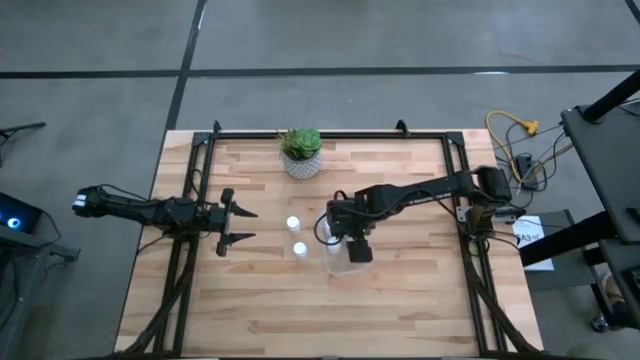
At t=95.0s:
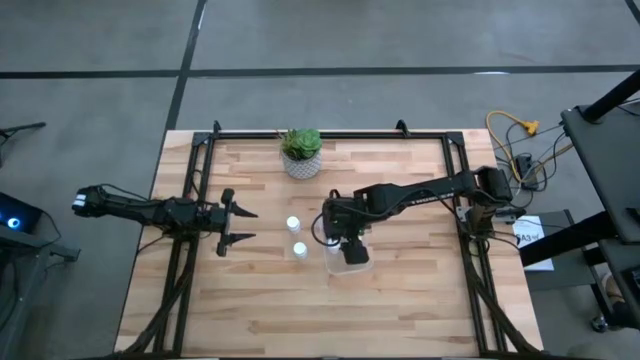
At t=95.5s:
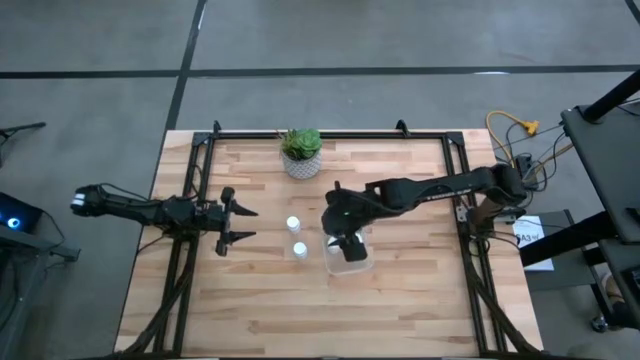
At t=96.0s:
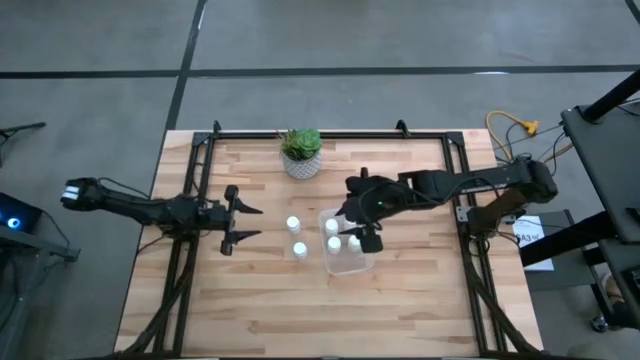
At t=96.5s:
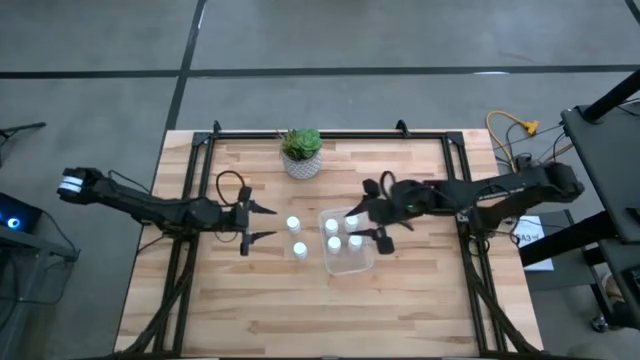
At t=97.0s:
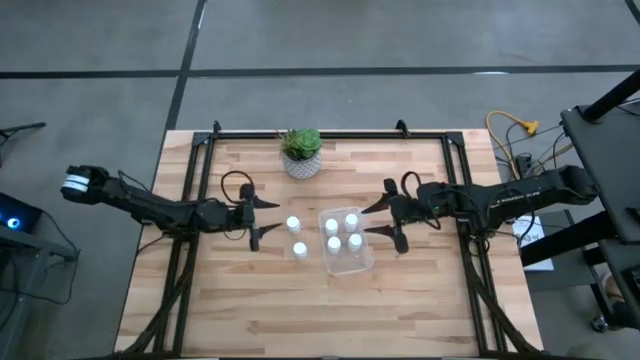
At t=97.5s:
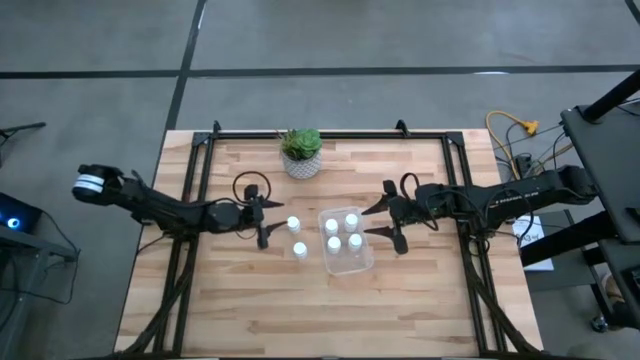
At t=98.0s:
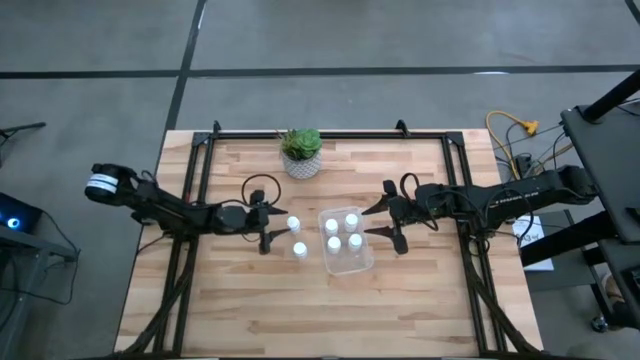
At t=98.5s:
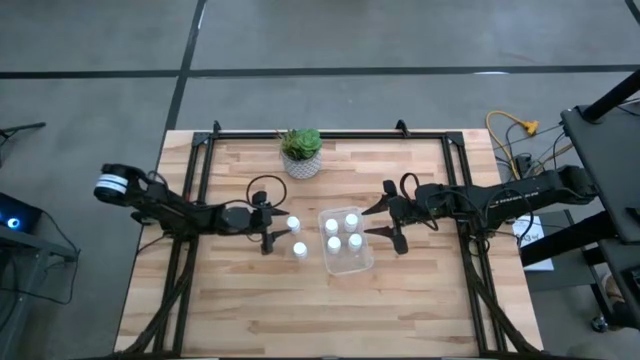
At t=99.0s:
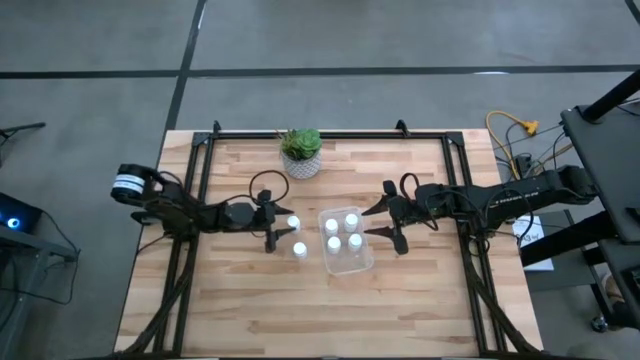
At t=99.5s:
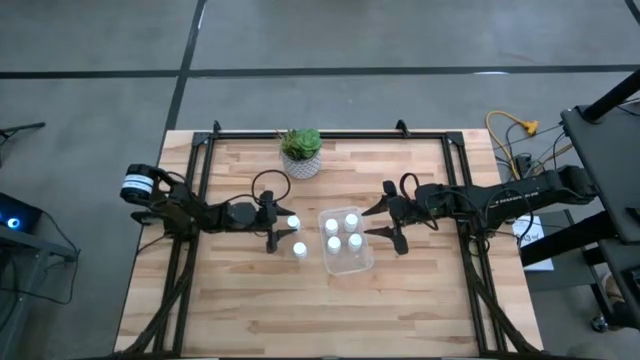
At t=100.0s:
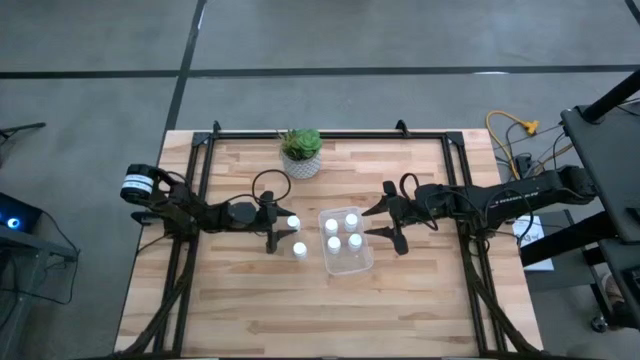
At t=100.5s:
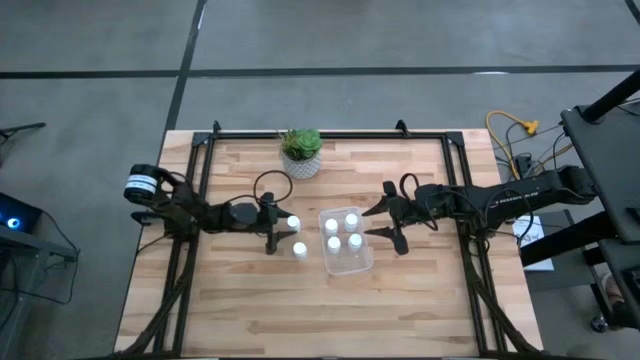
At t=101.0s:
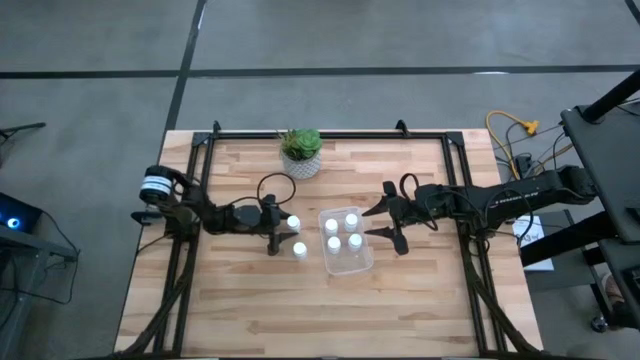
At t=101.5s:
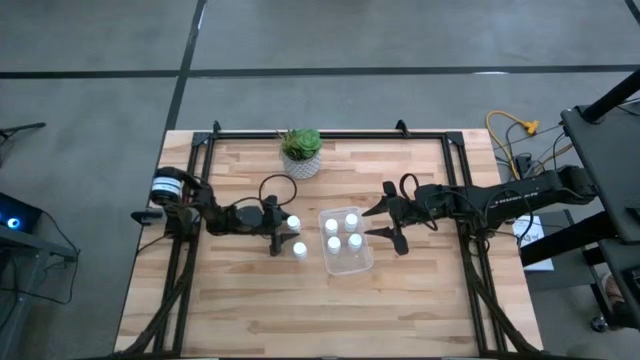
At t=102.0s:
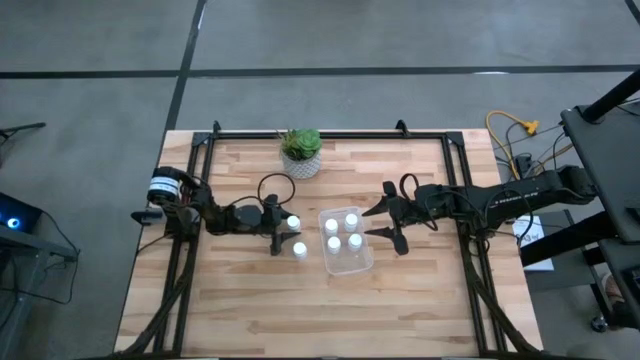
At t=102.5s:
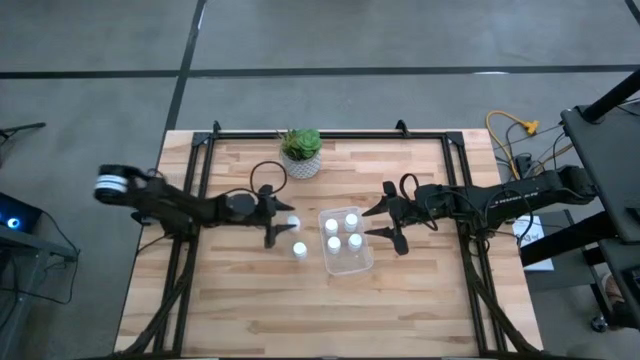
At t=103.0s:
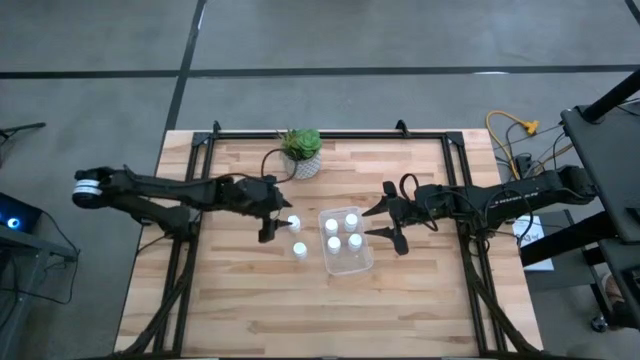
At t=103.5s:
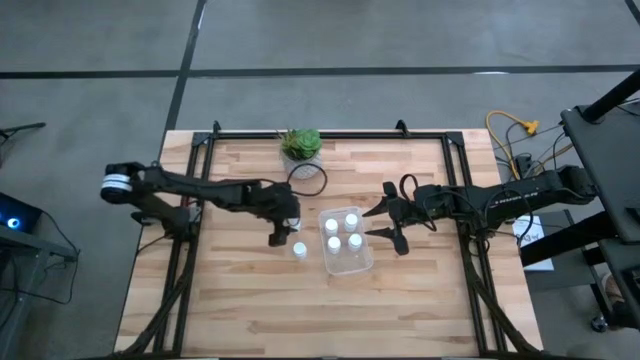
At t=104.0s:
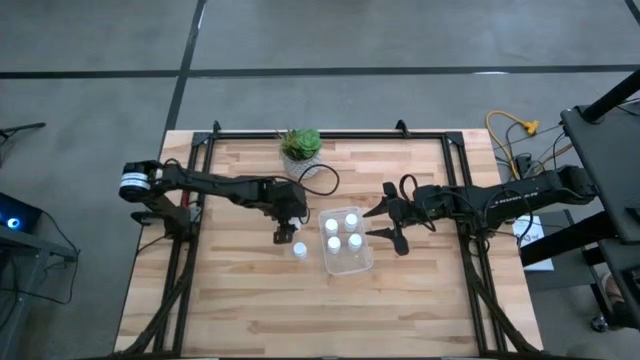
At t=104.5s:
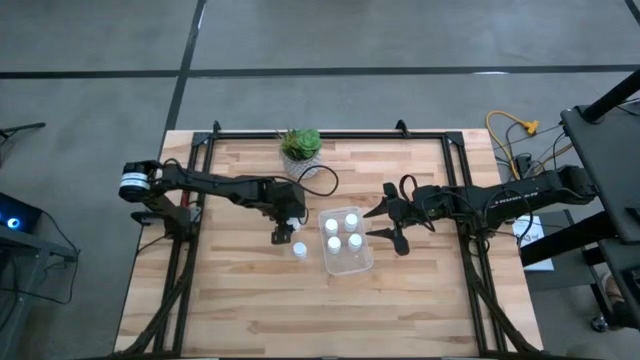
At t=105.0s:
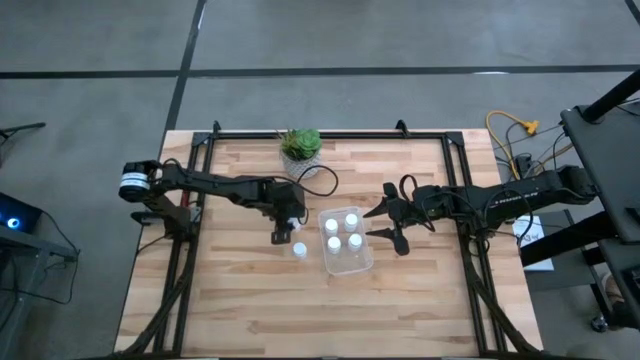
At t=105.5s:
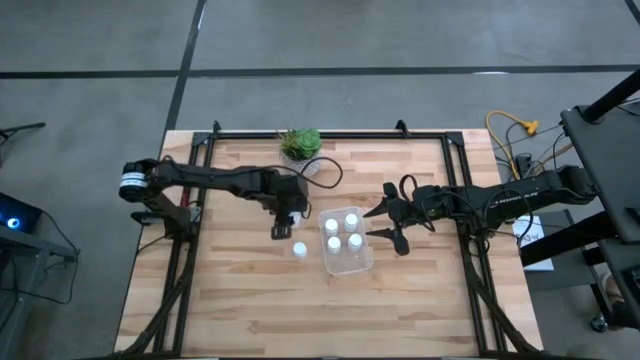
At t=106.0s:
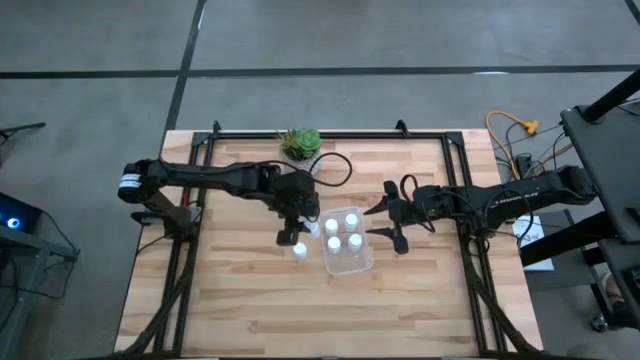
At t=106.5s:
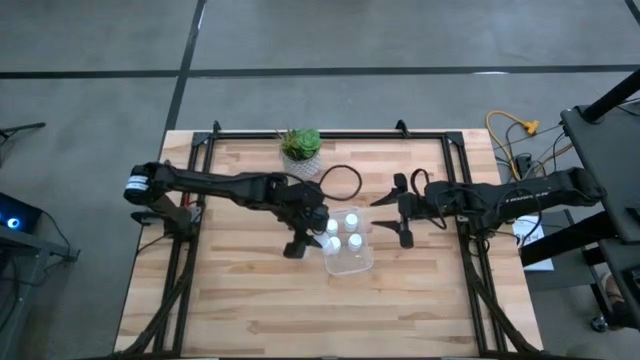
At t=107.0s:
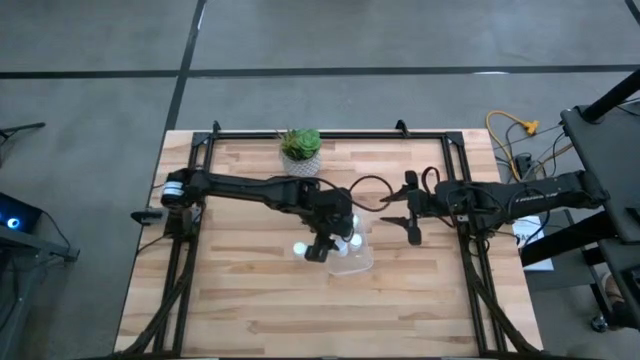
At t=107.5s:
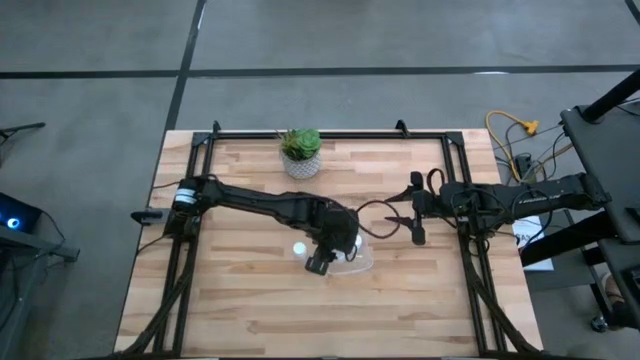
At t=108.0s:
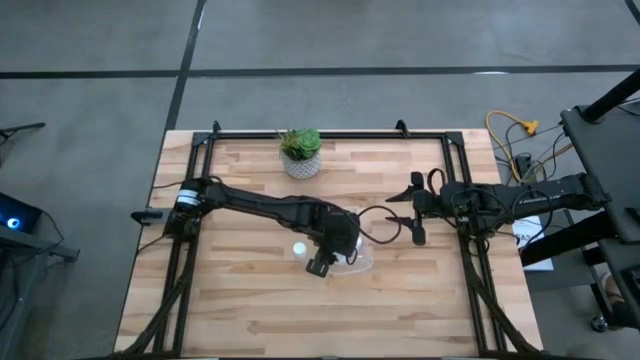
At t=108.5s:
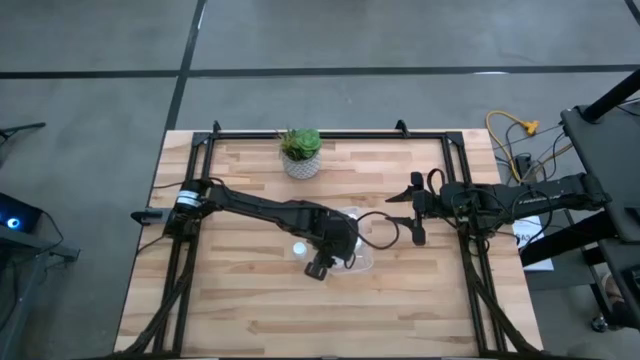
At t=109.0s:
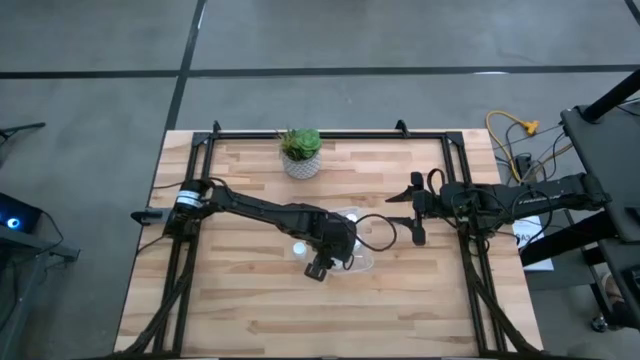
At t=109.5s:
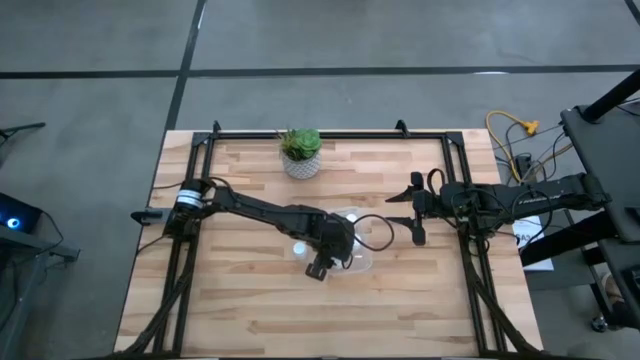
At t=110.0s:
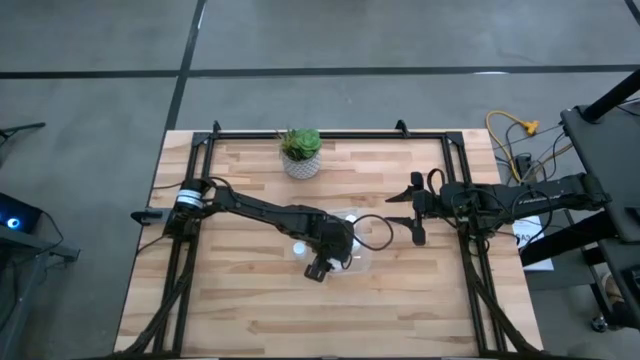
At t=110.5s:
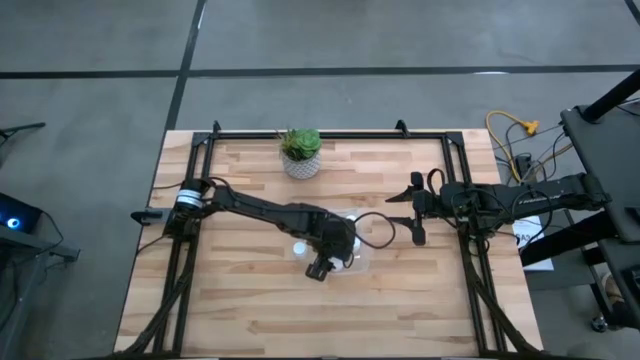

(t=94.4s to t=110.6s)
Task: Pick and place pill bottles into a basket
Put the white medicine bottle into the transparent bin

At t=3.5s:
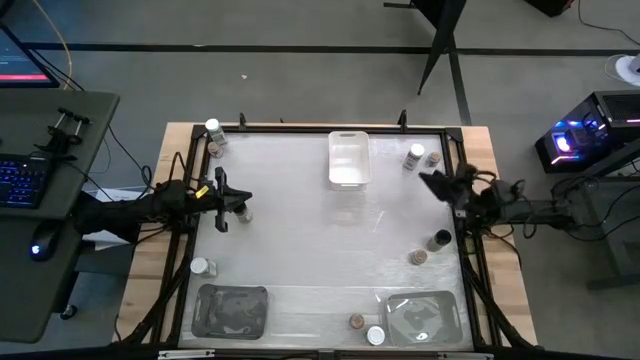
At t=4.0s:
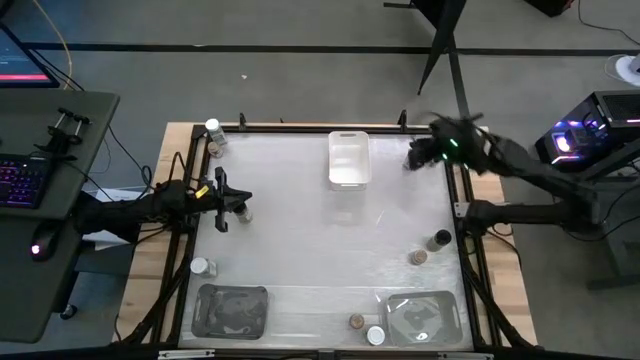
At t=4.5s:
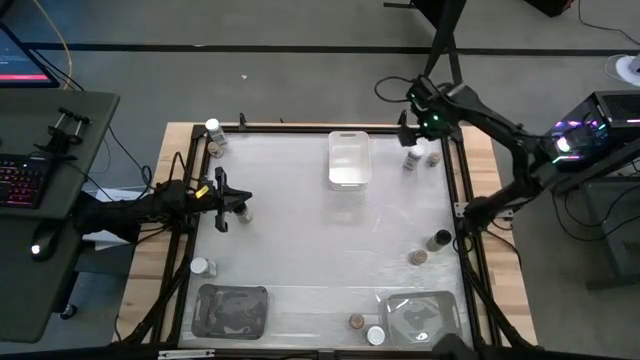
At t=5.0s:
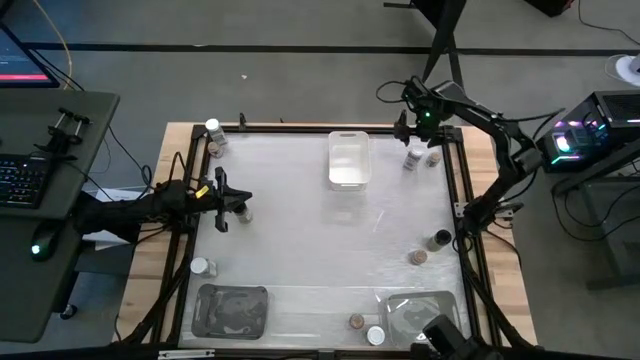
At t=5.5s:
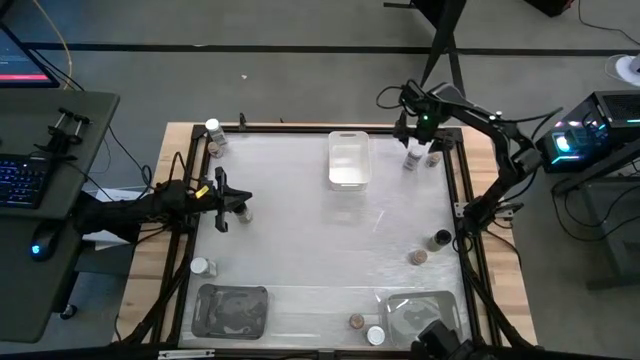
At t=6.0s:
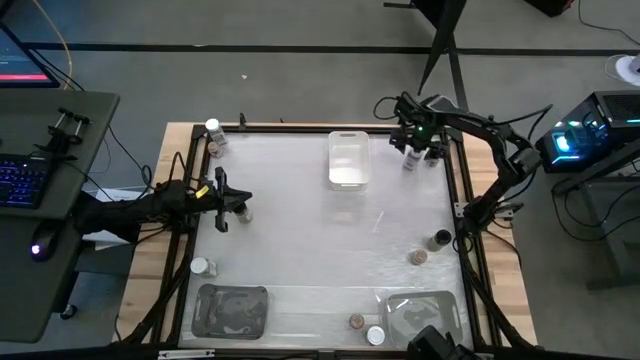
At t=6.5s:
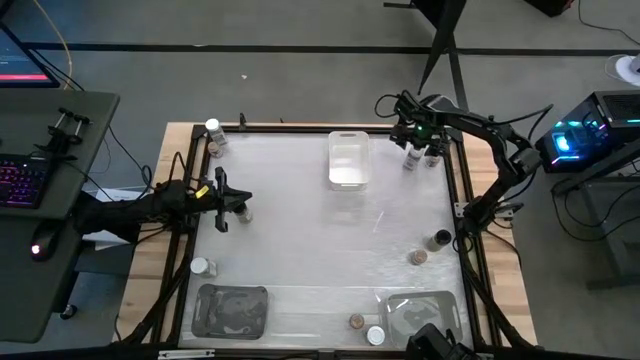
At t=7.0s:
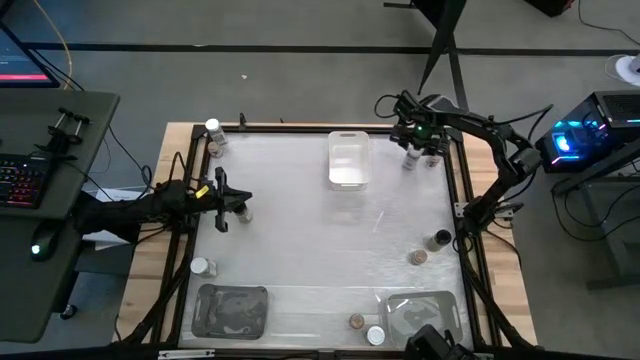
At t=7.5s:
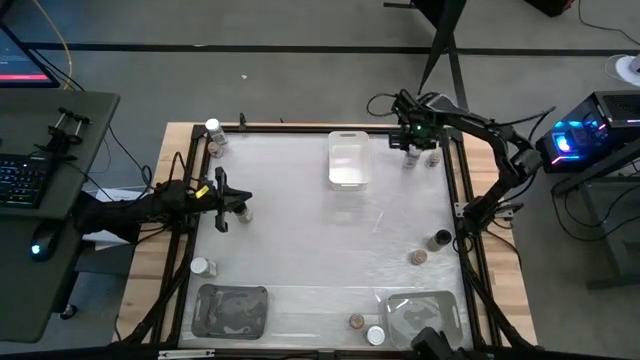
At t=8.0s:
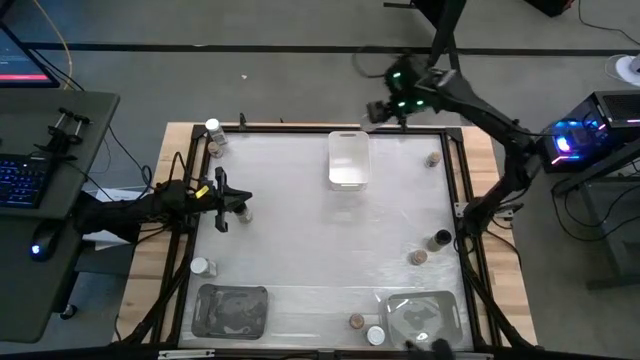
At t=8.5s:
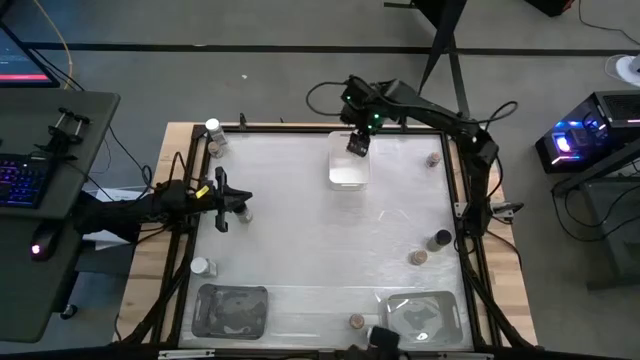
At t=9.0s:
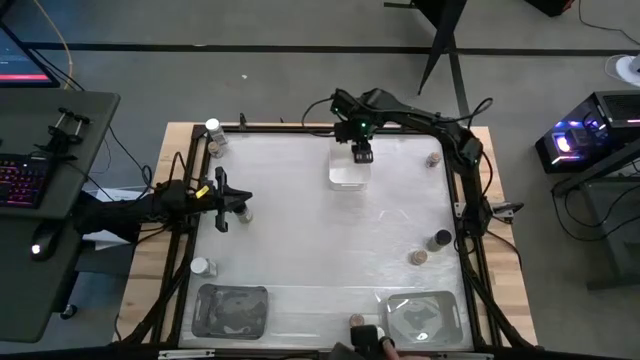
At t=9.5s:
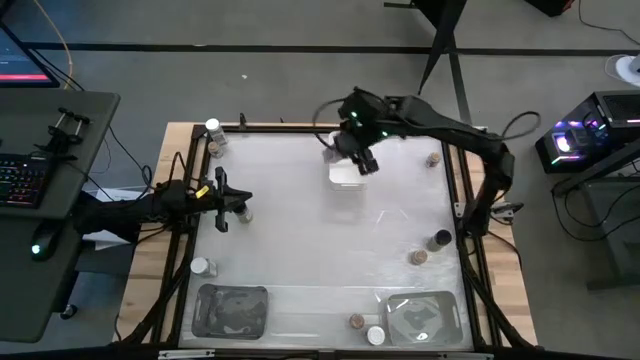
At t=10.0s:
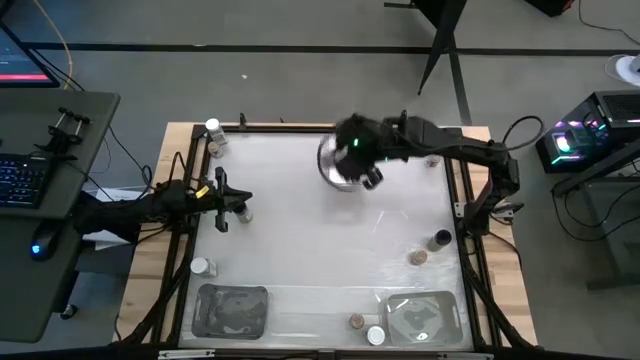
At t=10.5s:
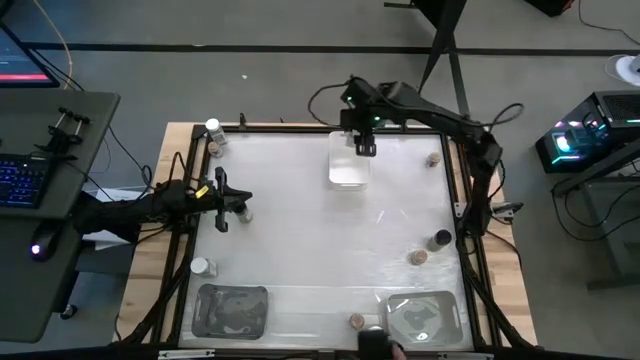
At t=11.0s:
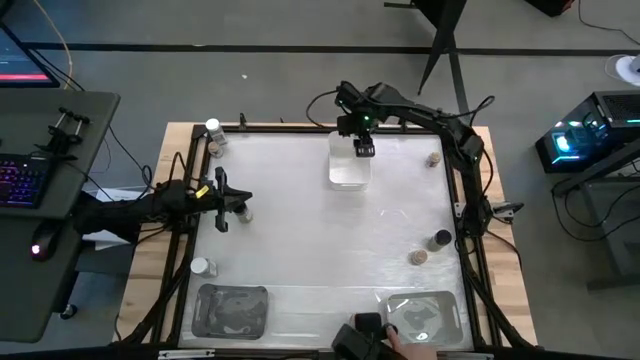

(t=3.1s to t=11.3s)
Task: Sort spices by type
Put the top right white seasoning bottle into the white bin
